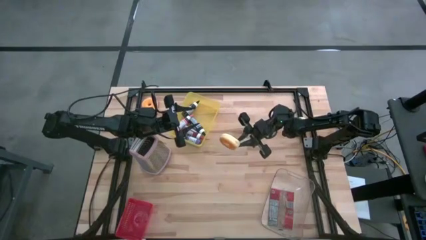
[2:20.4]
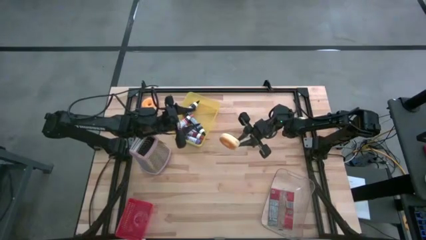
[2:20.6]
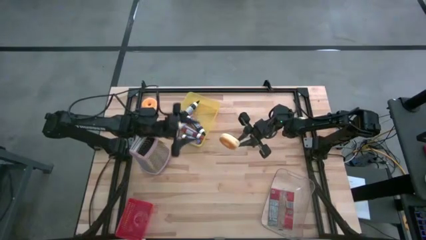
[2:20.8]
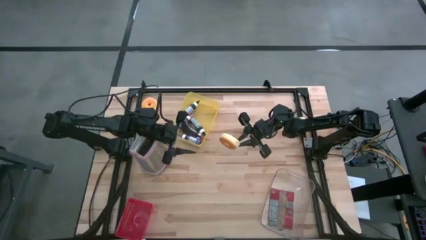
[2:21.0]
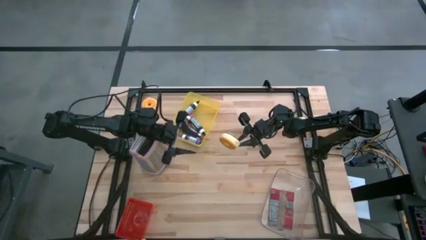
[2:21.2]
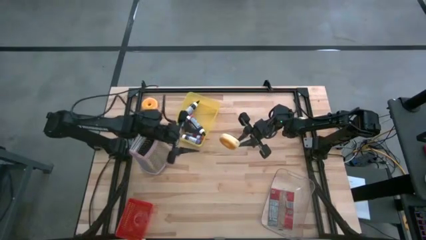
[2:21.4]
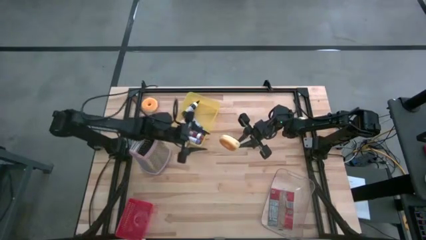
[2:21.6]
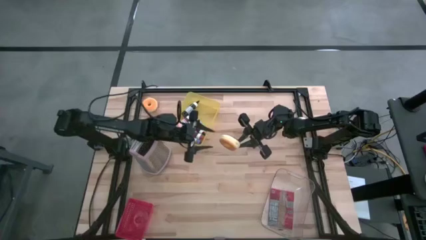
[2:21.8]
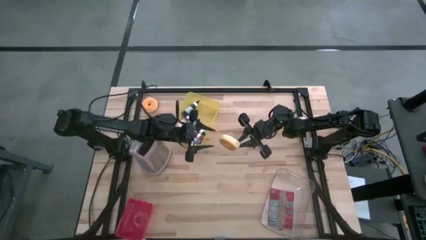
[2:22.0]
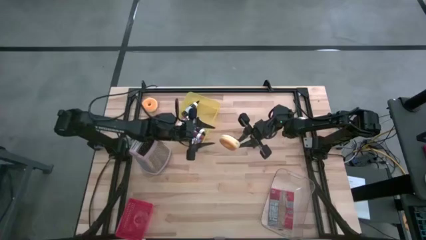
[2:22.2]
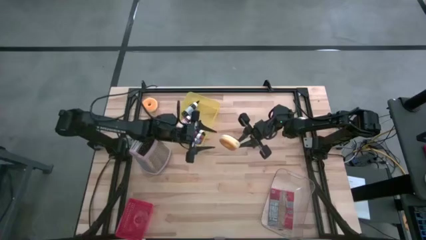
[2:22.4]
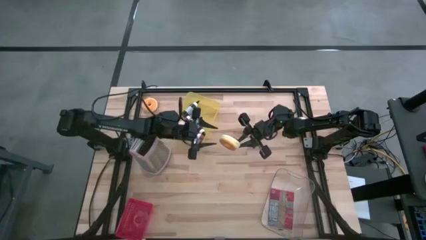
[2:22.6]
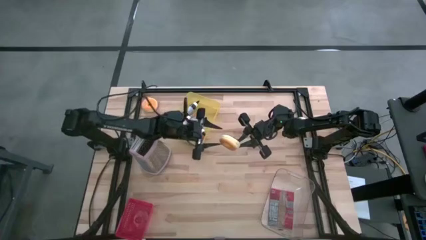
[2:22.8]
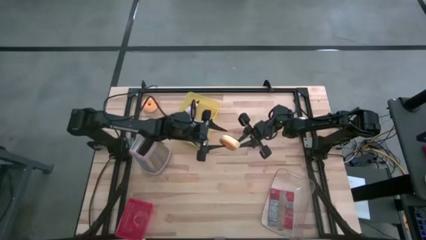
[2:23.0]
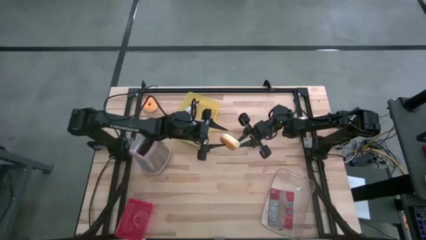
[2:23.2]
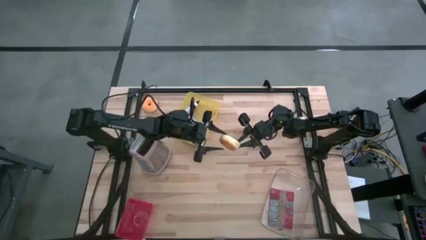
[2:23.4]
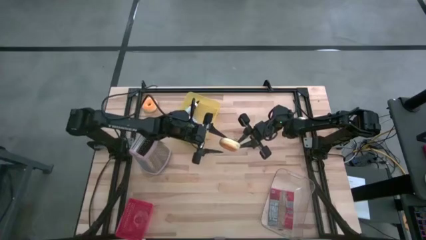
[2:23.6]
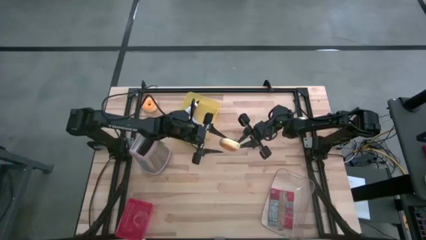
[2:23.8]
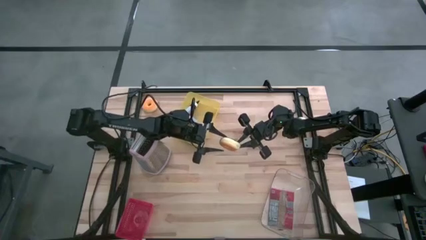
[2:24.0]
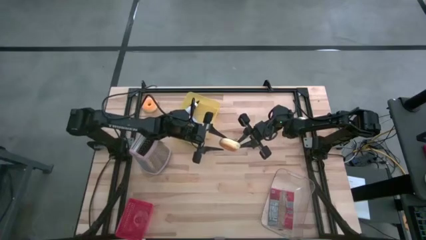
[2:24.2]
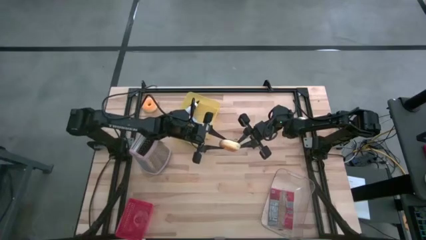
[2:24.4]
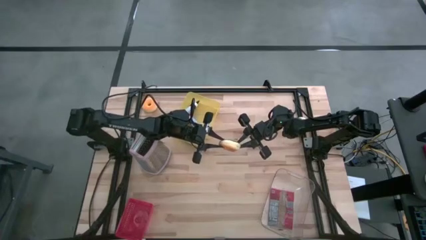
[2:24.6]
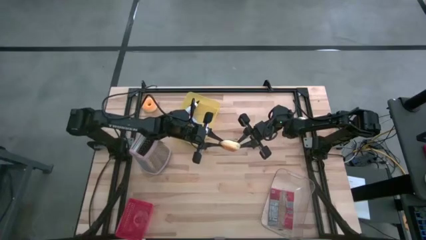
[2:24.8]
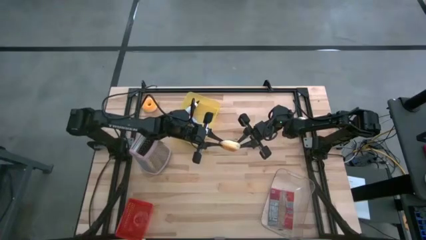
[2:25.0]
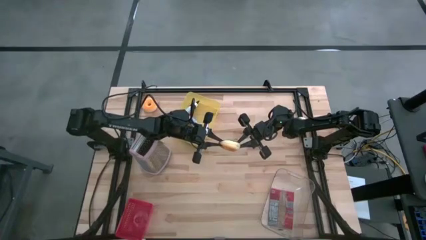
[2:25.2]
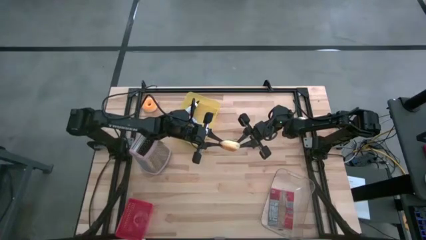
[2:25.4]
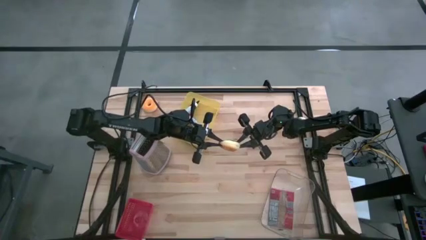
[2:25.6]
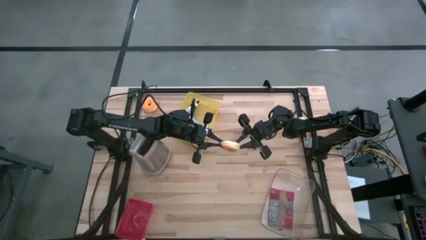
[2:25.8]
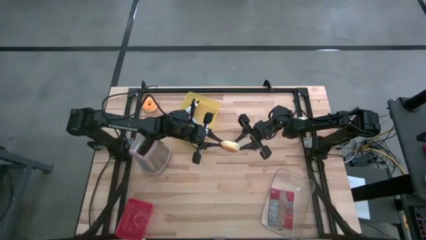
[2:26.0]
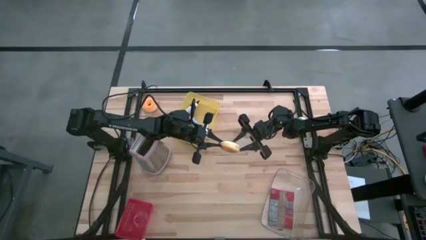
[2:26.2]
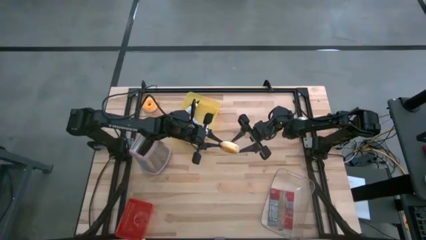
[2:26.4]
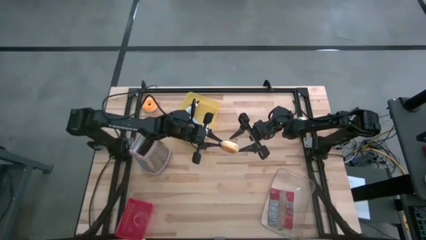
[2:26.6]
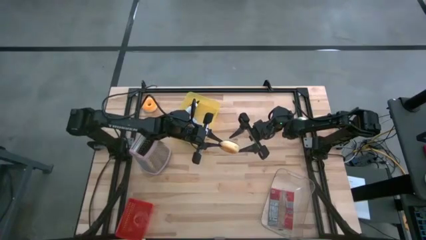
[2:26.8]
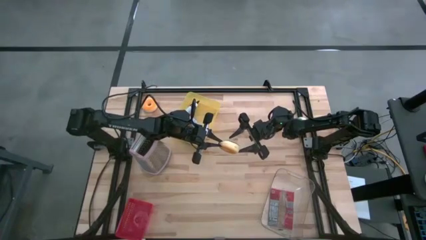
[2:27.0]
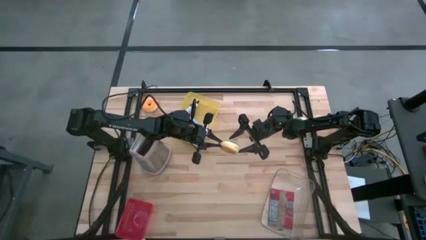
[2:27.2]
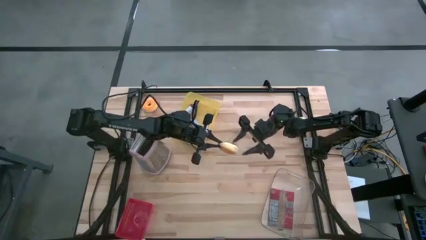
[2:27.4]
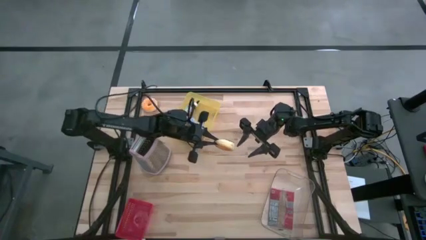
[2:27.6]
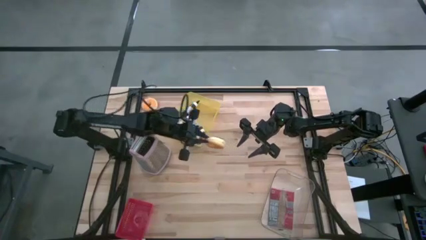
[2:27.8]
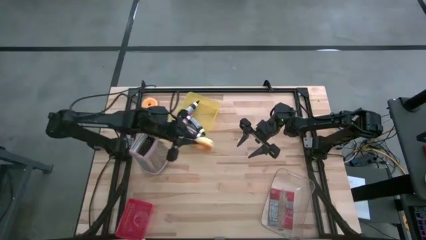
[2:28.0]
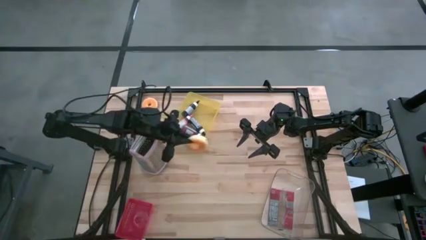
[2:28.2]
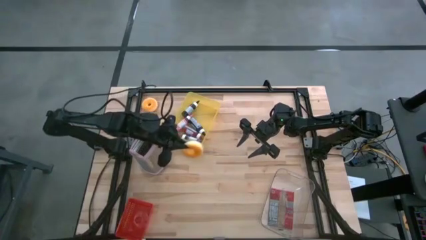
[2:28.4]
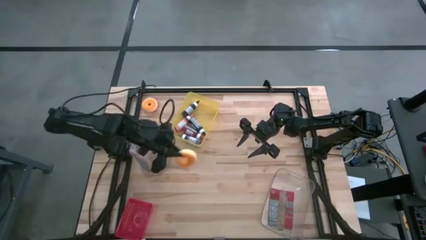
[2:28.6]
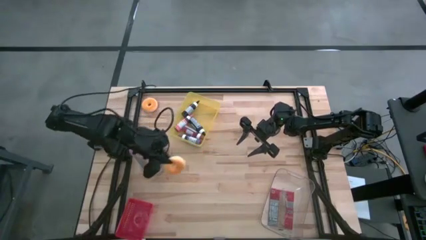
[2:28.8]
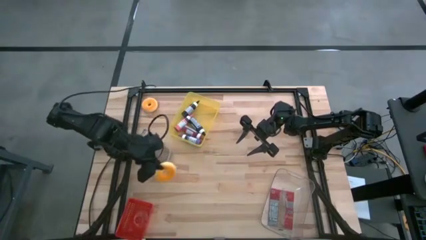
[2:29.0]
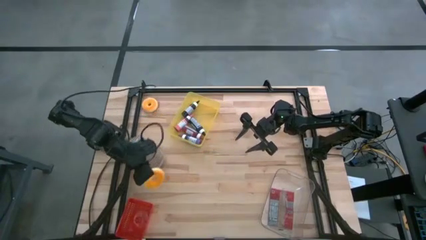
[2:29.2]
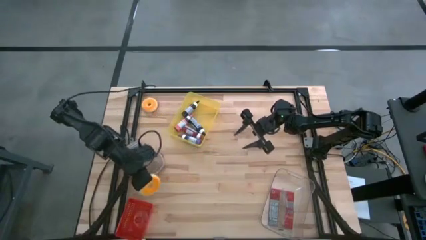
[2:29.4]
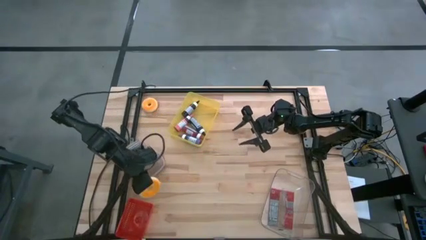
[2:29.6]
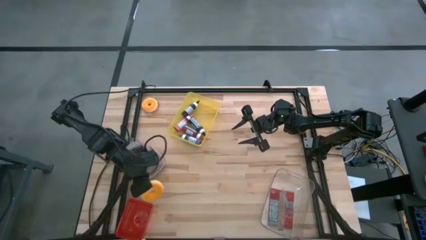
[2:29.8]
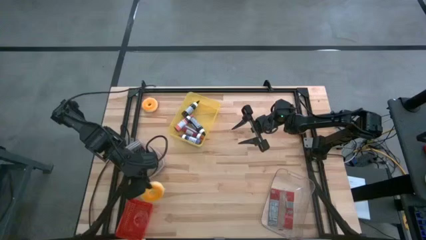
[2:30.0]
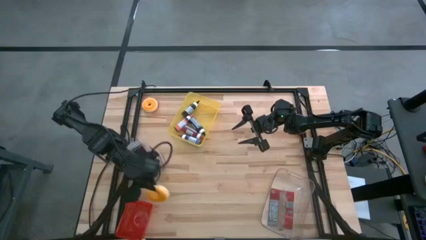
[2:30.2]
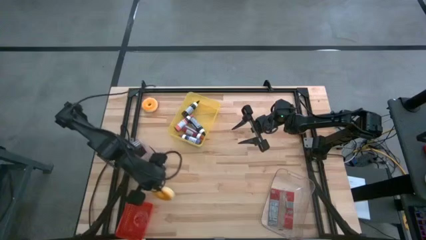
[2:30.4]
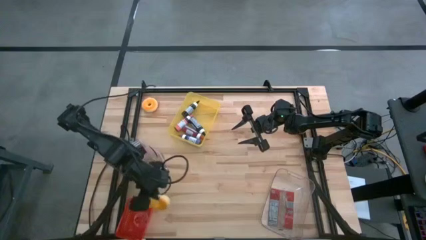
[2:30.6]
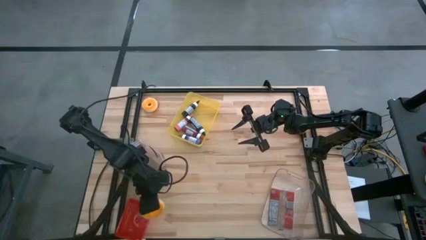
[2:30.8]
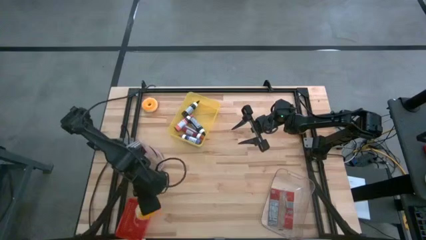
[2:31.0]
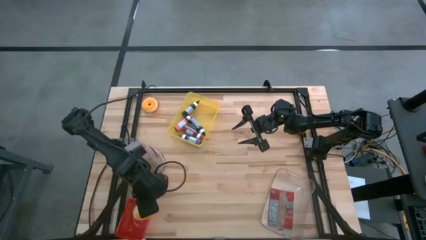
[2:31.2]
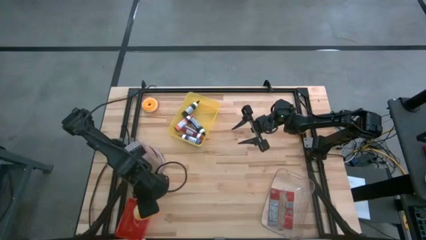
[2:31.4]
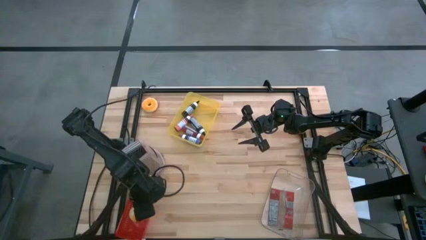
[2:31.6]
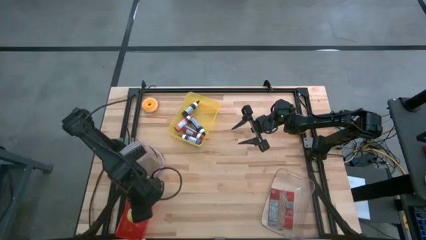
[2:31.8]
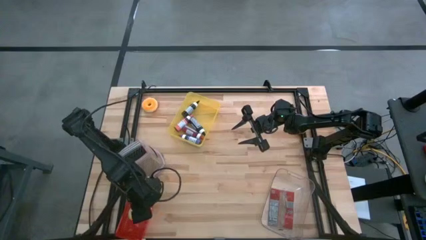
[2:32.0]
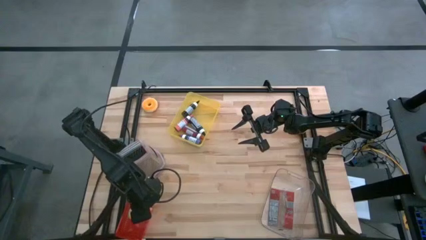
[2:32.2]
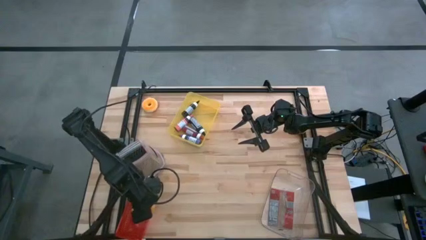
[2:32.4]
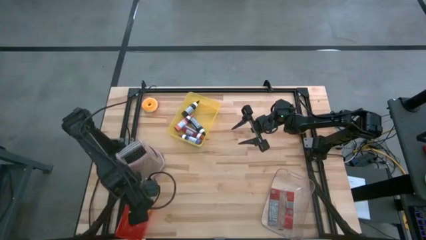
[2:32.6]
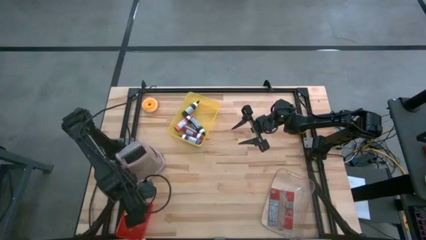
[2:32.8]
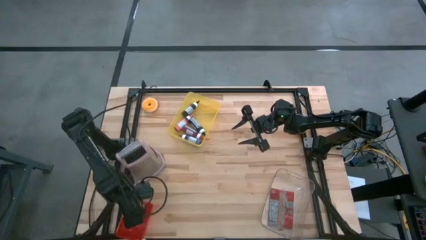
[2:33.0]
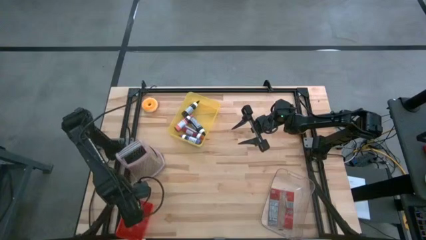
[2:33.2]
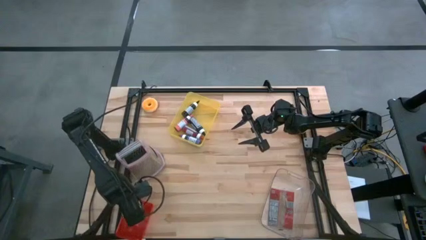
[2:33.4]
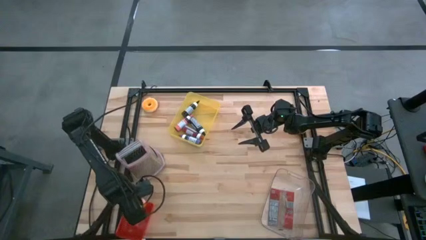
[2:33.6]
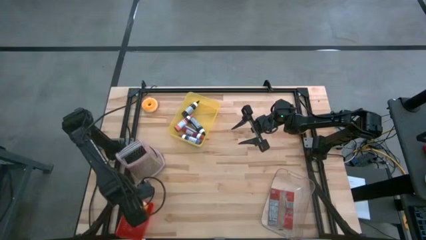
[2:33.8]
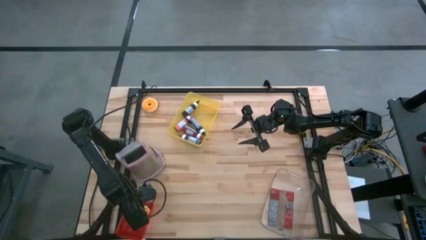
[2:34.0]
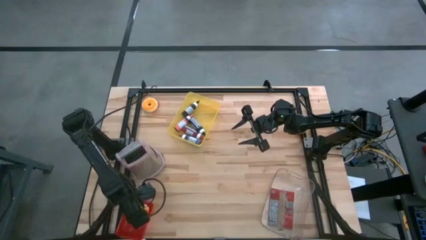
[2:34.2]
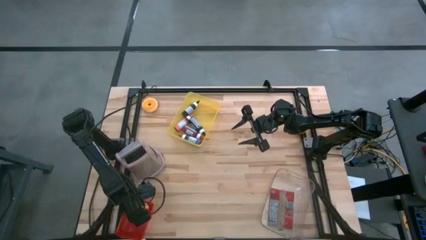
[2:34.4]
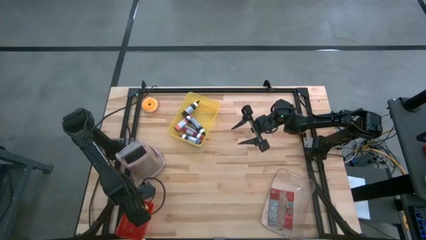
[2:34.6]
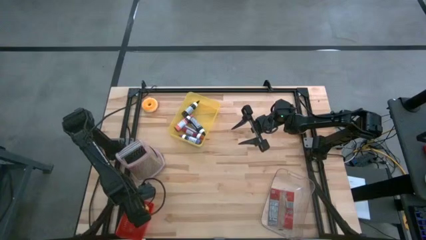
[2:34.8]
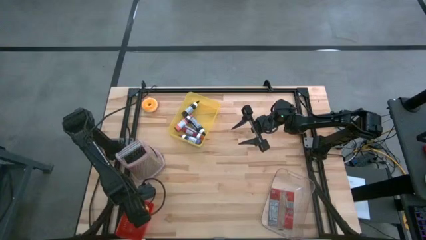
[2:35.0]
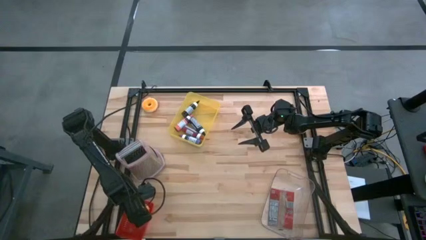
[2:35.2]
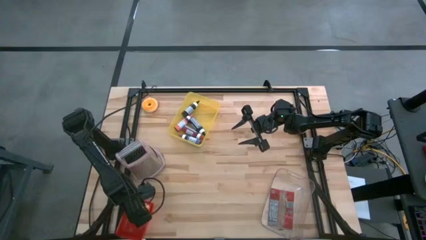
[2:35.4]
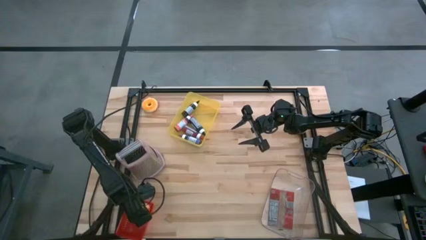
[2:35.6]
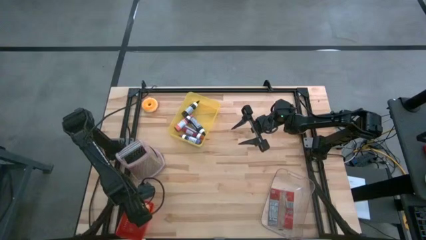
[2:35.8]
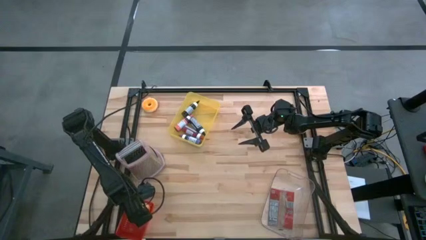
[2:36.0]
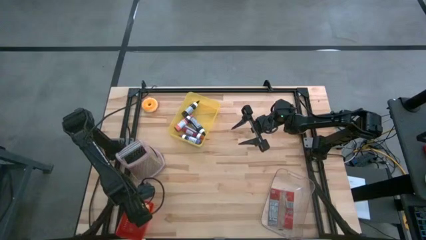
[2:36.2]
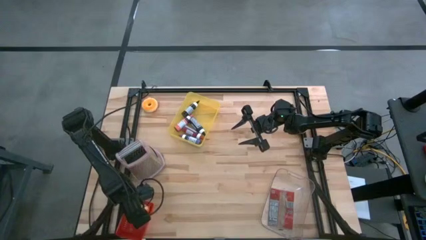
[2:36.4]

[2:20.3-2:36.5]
Task: Pick & Place Food Item
Put the black donut into the red bin
